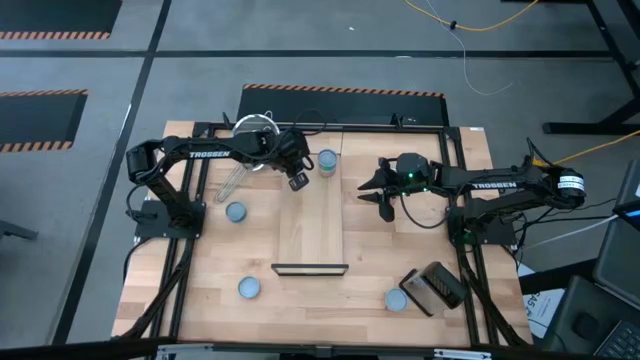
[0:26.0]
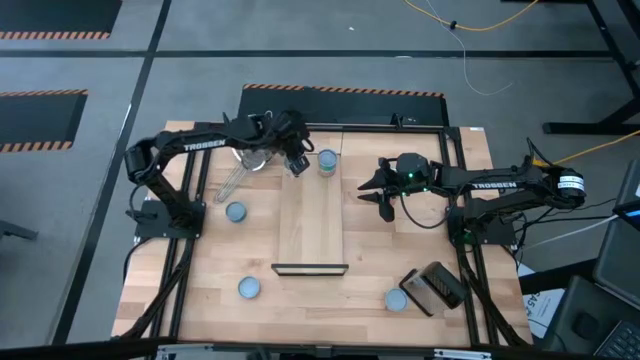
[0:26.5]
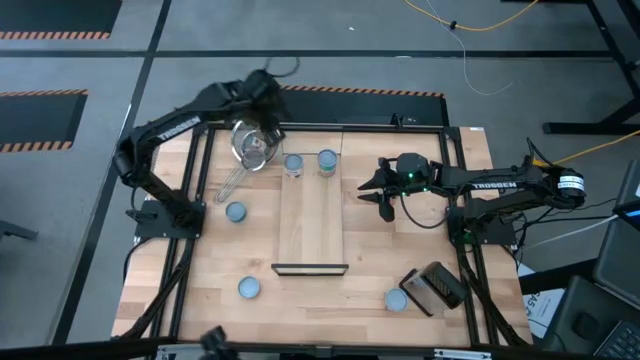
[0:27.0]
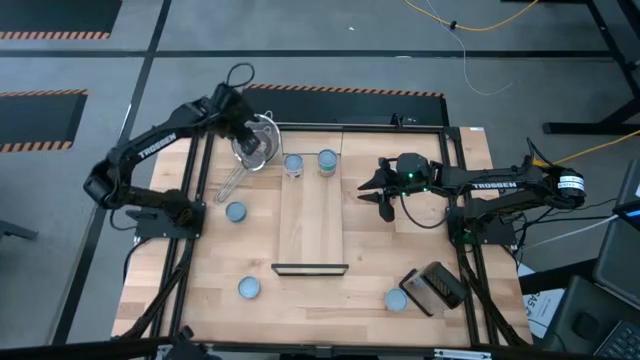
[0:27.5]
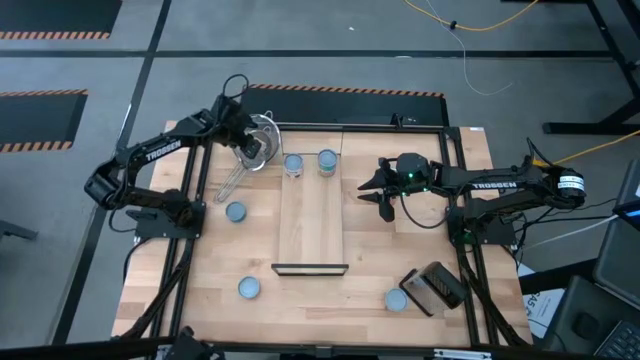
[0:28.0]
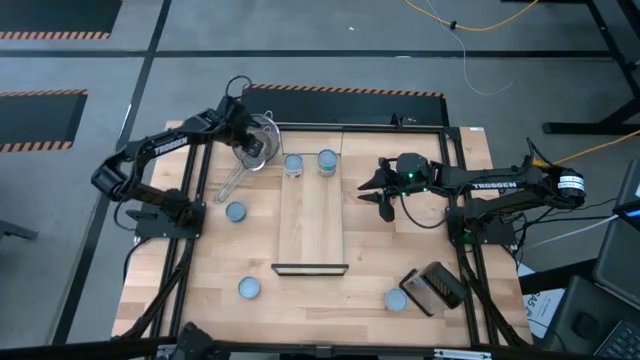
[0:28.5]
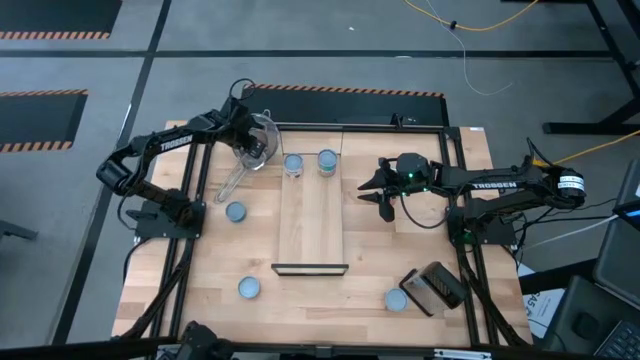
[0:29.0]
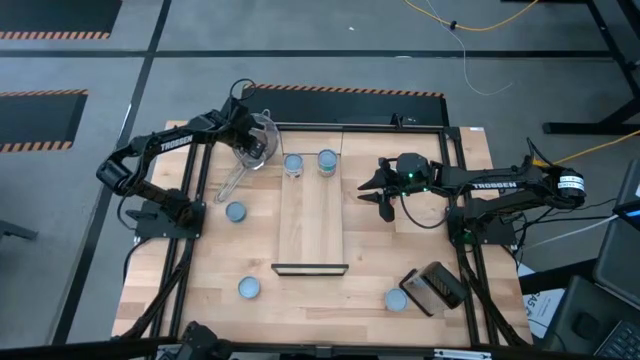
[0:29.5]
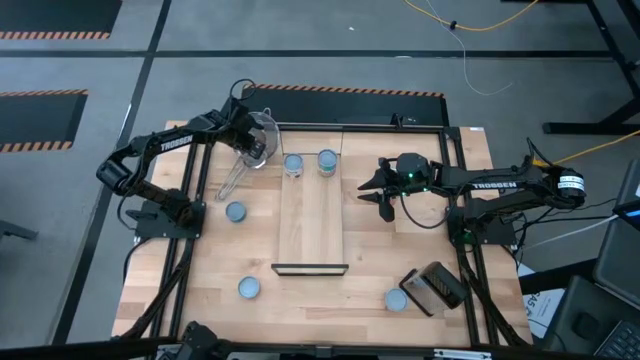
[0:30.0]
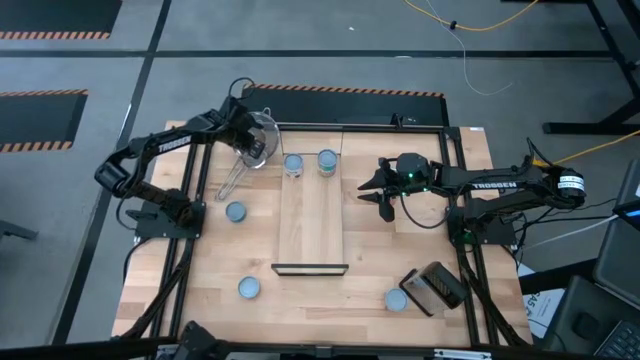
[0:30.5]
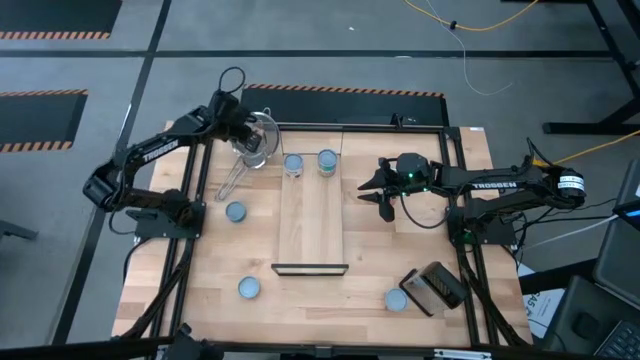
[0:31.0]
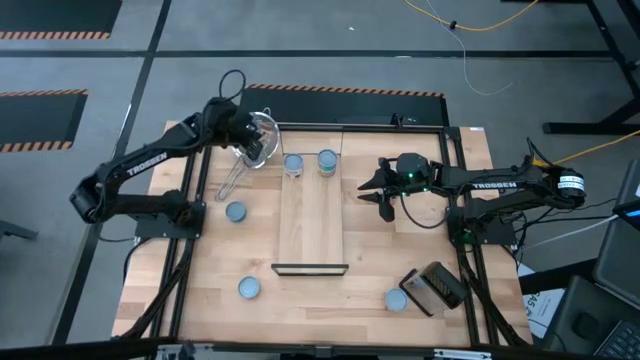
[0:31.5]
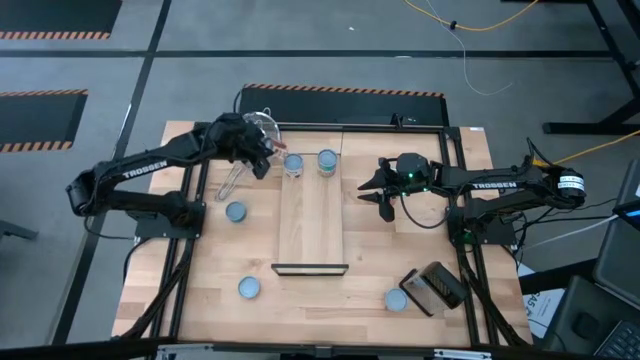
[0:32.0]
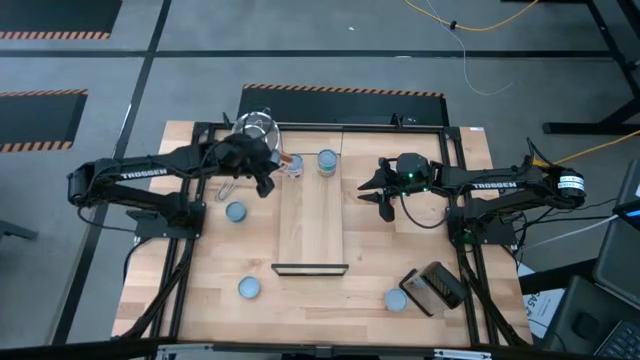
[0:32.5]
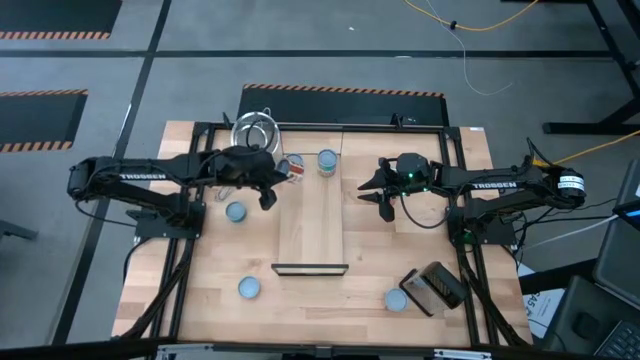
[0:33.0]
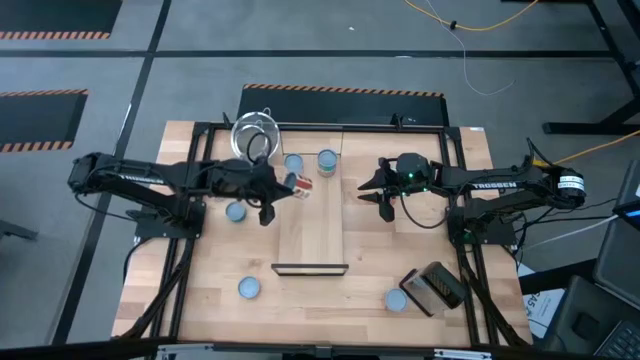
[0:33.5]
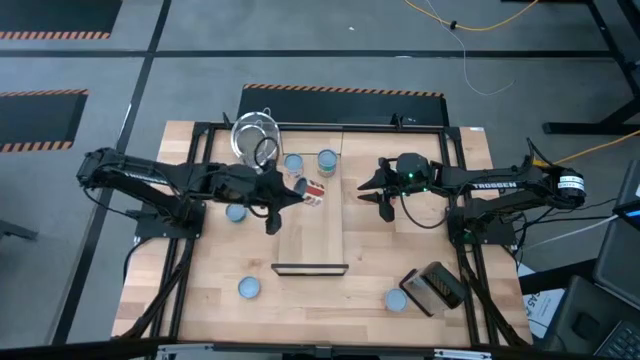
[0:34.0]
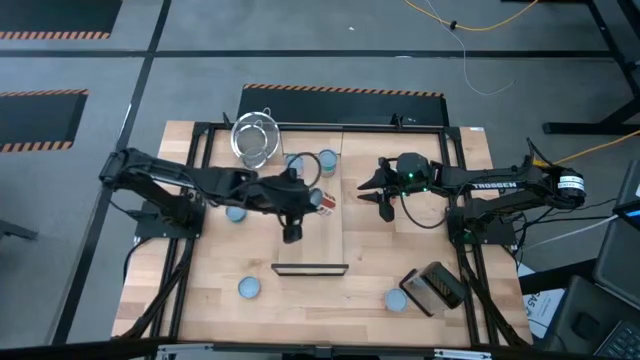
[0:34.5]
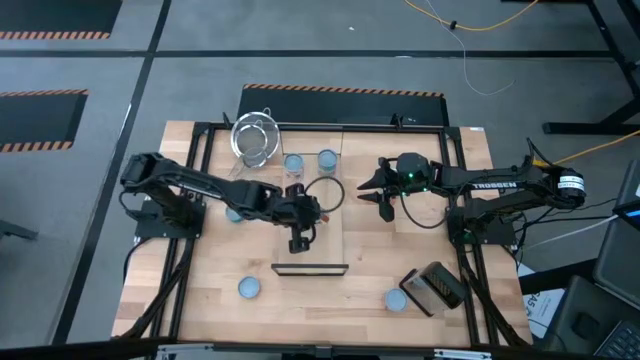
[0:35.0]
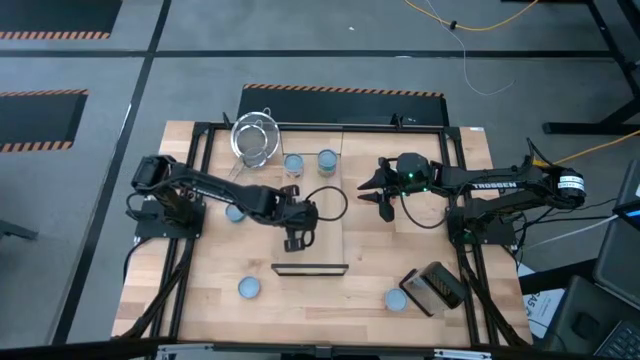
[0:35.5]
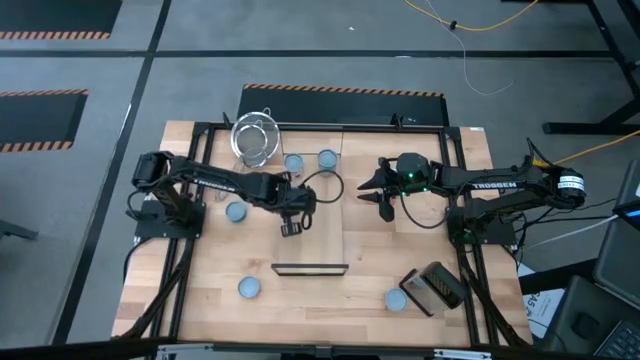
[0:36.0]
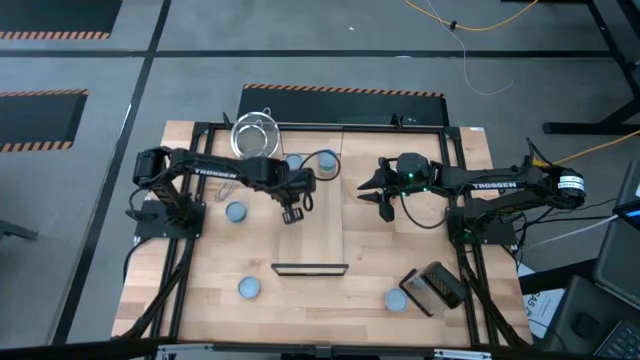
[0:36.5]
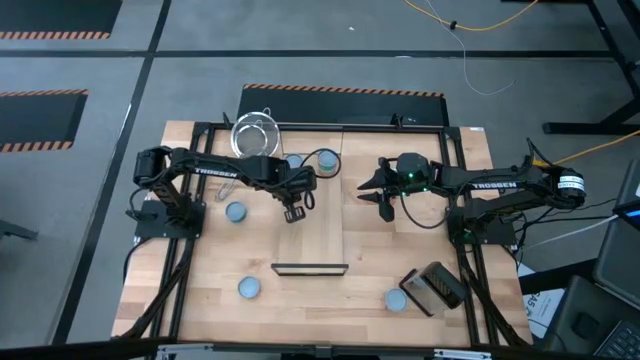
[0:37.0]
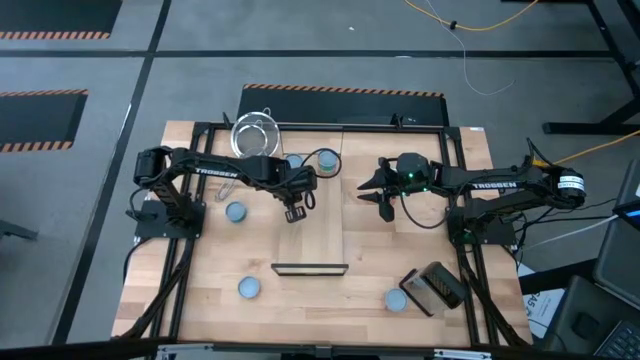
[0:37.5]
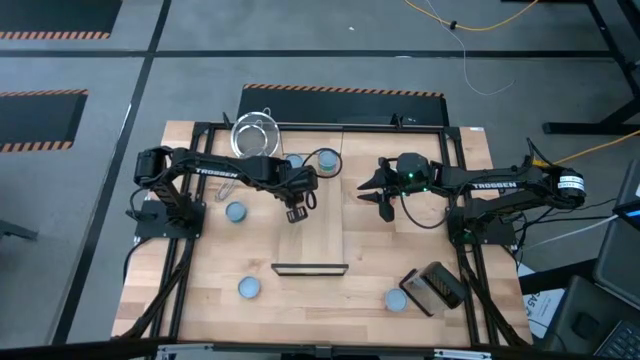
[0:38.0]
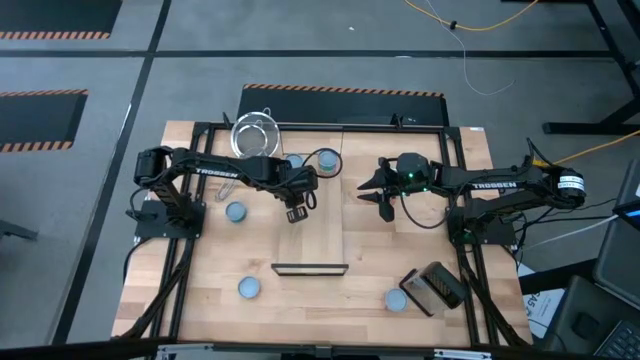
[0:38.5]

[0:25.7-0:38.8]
Task: Pick and place cans onto a shelf
Put the canned diced tomatoes on the shelf

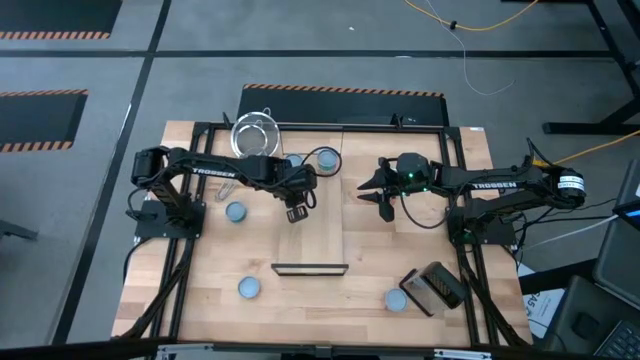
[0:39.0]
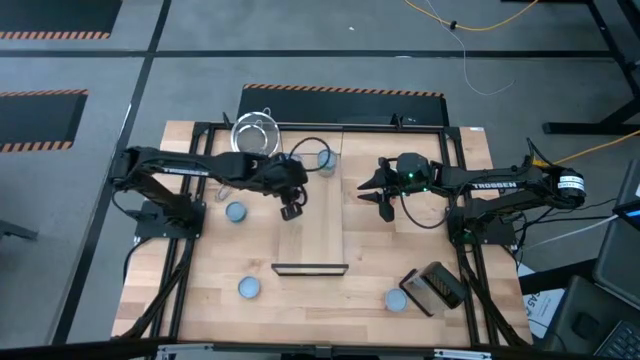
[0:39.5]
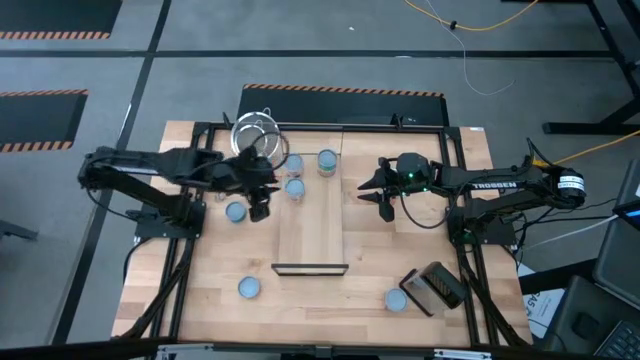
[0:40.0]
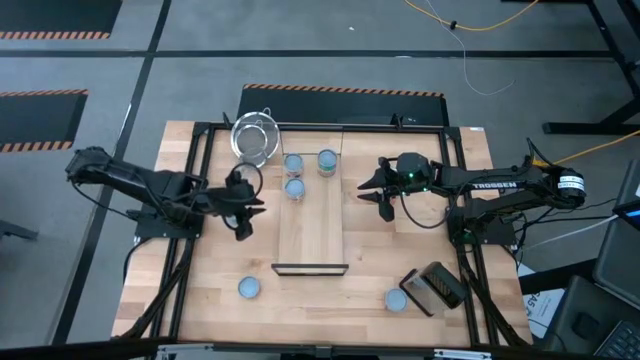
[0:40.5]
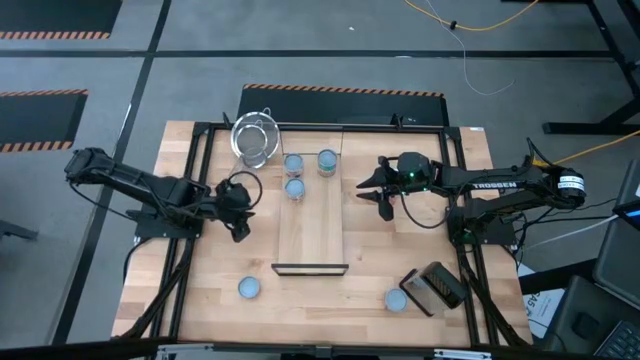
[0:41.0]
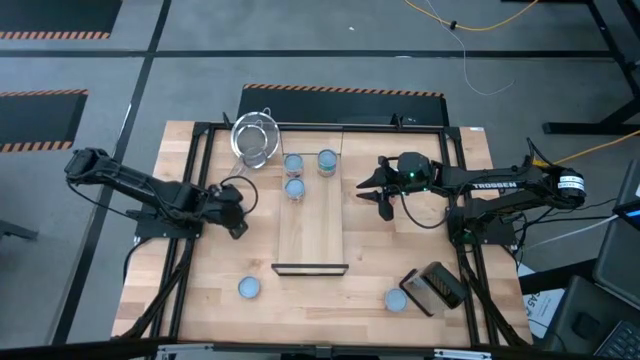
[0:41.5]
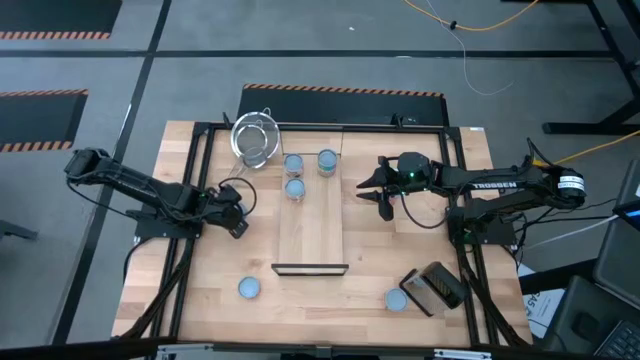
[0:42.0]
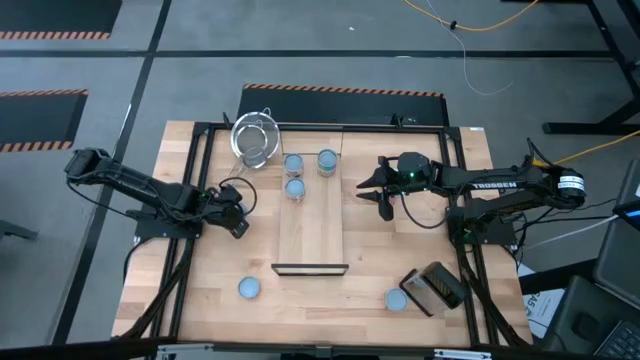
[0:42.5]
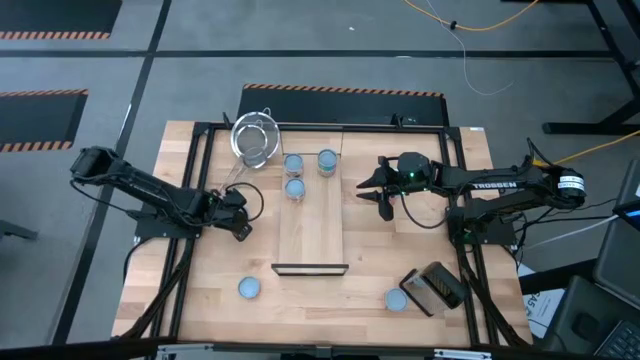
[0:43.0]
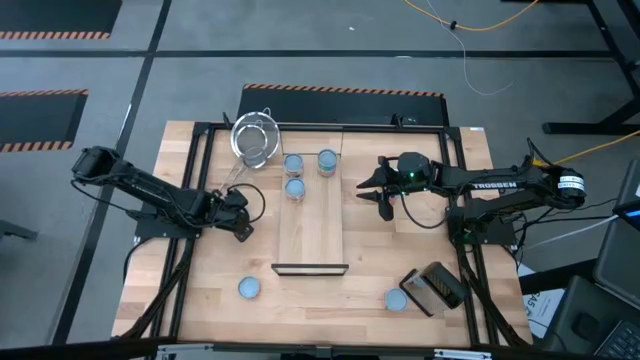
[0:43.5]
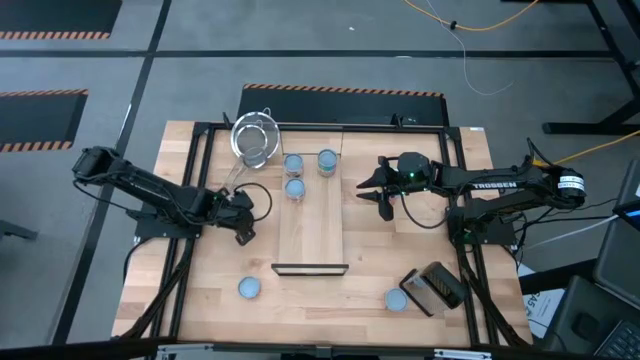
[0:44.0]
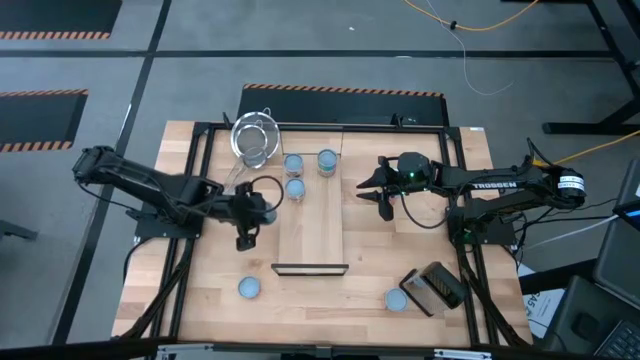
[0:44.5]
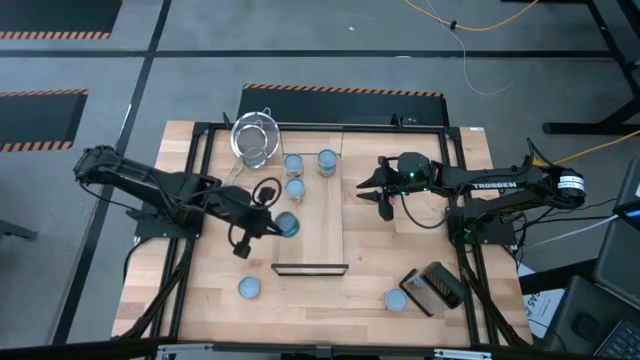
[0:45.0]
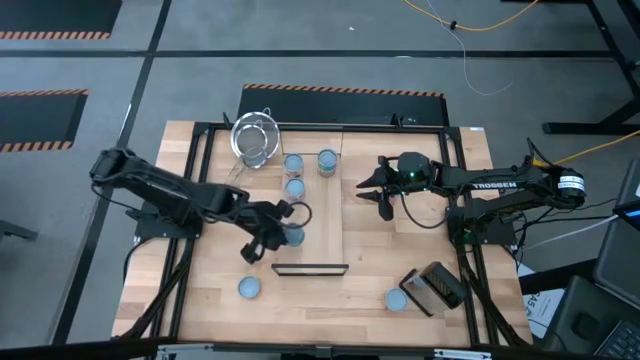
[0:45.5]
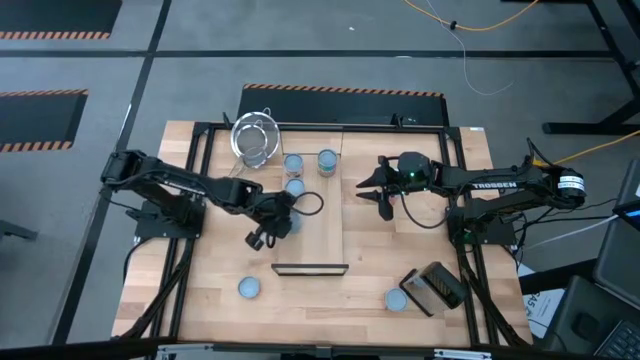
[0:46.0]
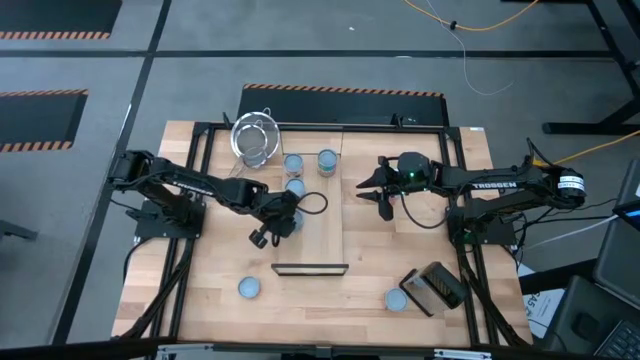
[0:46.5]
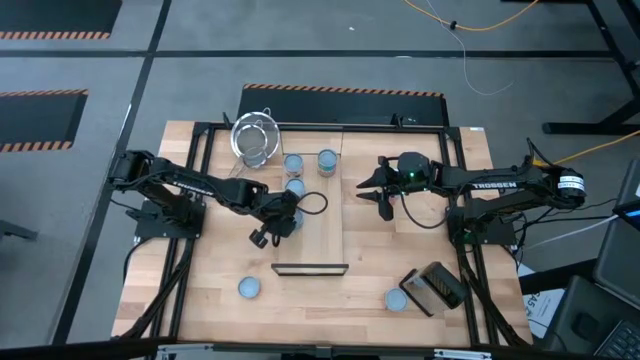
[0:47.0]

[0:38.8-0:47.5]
Put the canned tuna on the shelf
